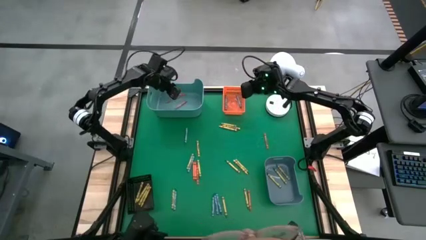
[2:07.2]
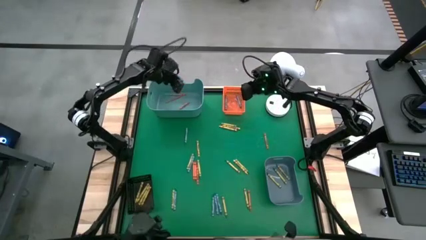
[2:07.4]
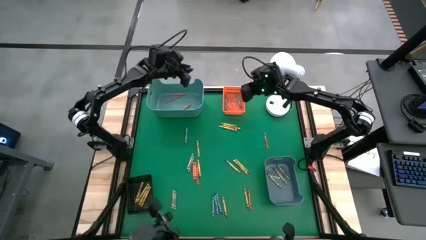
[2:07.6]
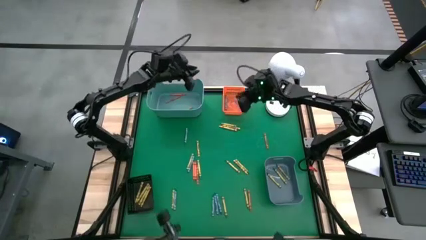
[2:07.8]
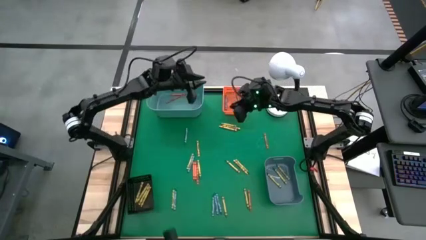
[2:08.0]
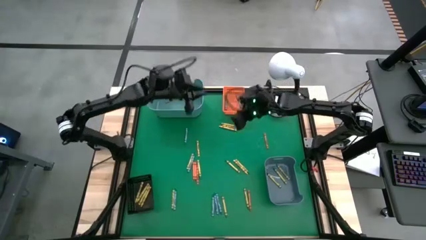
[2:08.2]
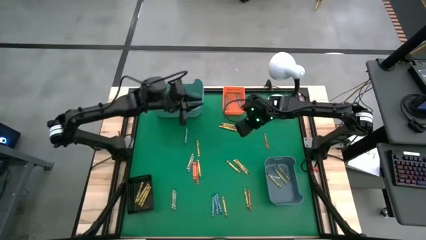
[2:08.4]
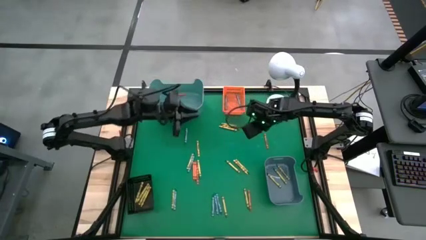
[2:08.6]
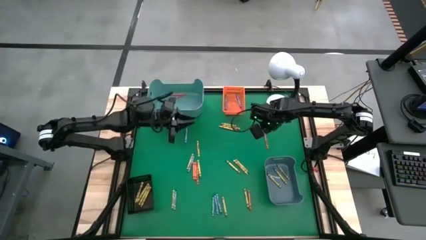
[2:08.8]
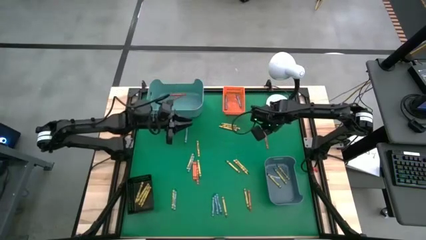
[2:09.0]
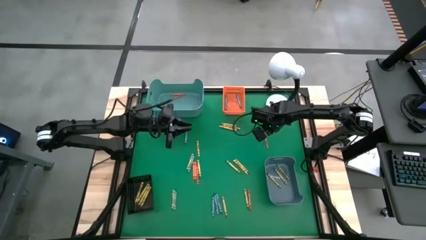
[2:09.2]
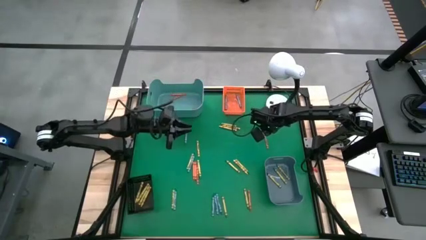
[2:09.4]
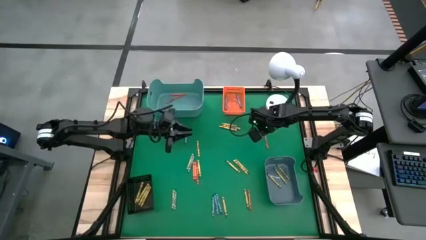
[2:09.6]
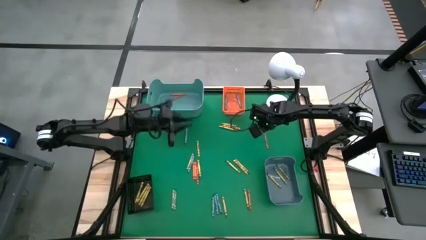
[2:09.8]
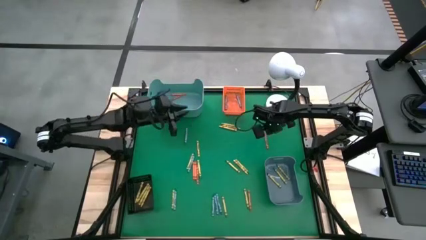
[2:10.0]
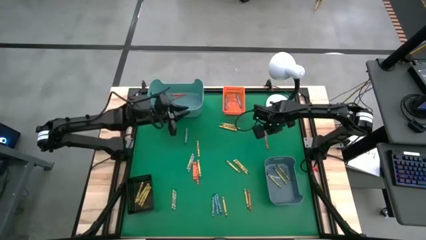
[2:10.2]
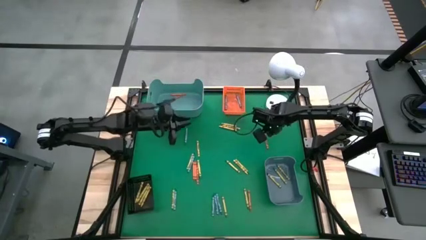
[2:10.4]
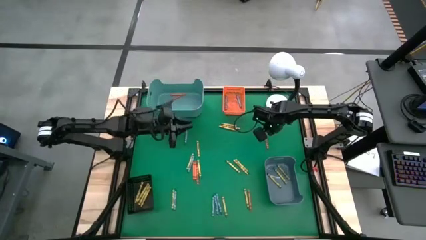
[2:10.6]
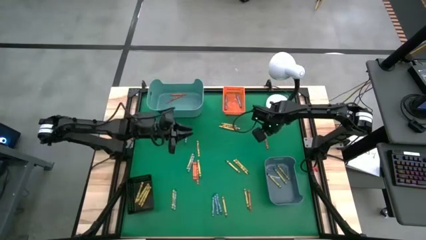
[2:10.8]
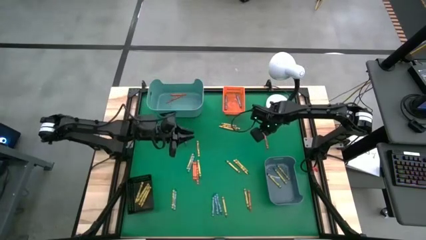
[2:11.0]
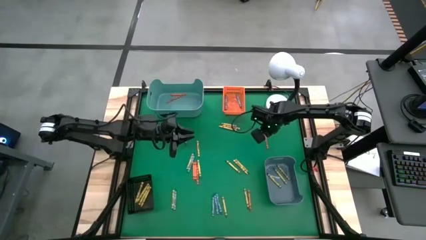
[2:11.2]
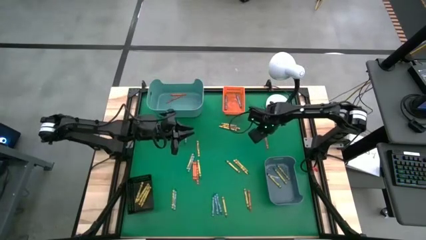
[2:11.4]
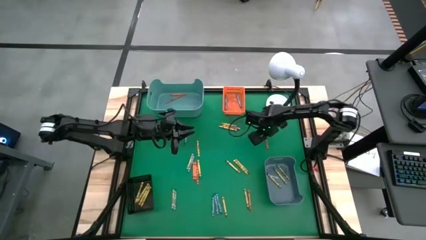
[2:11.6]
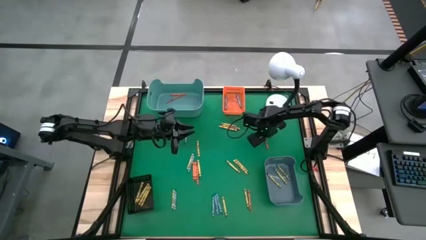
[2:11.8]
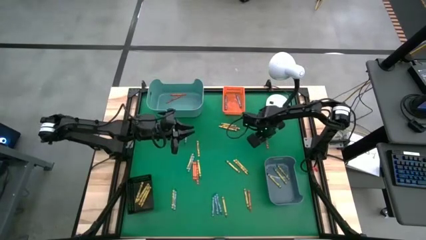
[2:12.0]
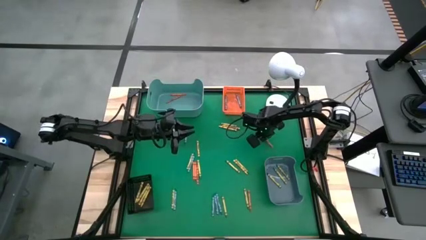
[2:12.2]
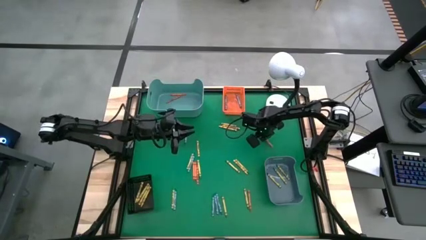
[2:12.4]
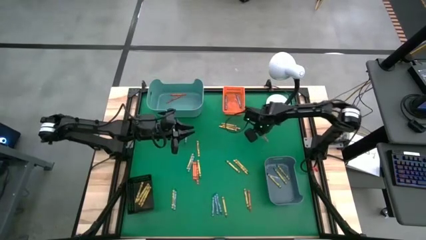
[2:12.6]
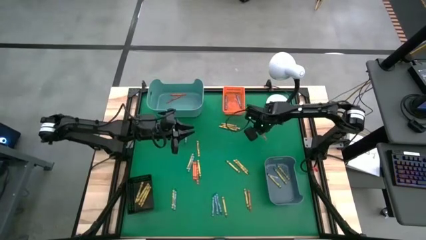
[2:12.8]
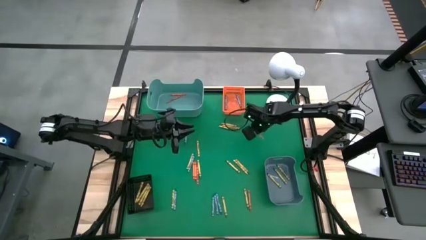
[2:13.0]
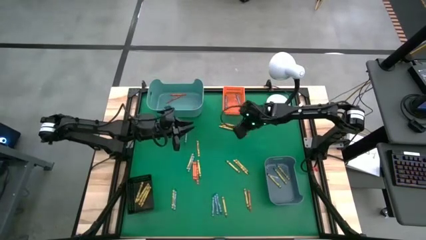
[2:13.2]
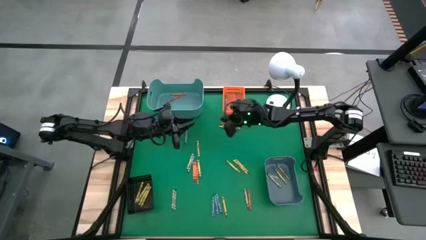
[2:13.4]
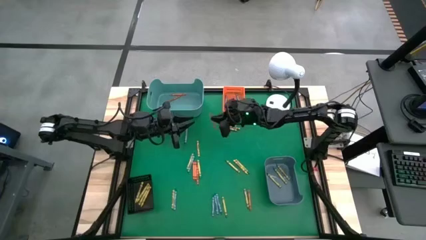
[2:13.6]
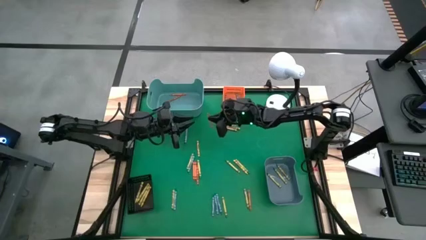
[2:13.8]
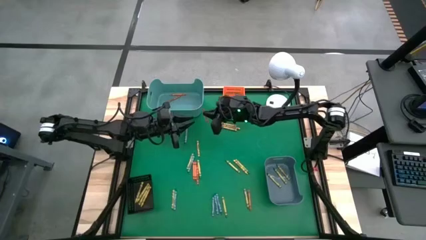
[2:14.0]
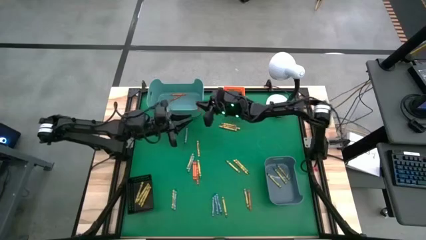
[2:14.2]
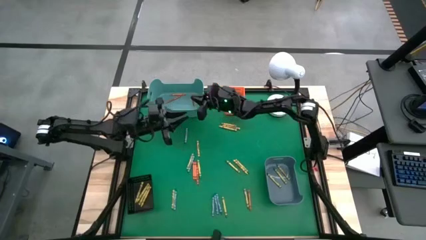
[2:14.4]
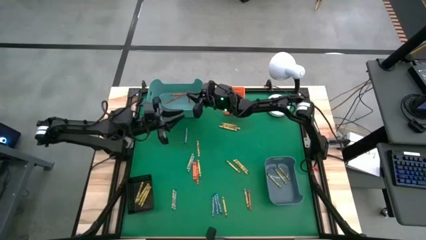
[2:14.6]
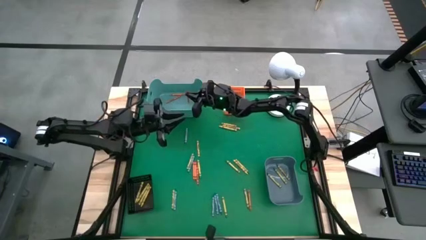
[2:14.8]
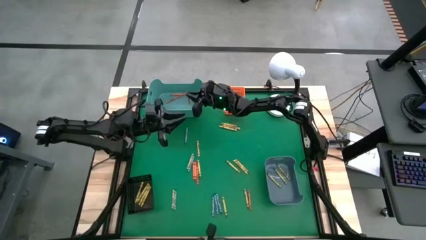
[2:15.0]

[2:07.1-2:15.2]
Task: Sort crayons
Put the orange crayon into the green bin

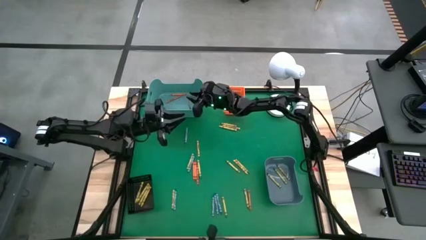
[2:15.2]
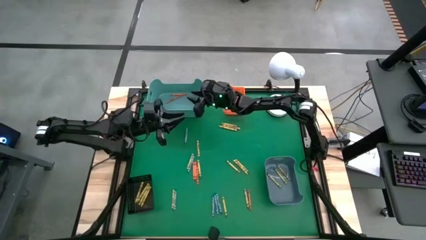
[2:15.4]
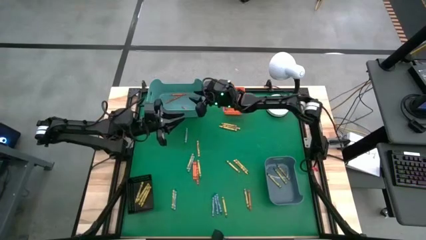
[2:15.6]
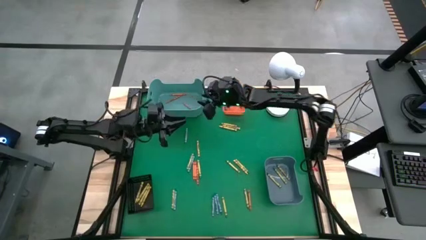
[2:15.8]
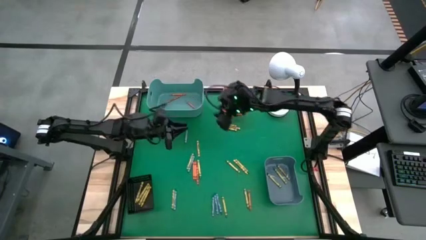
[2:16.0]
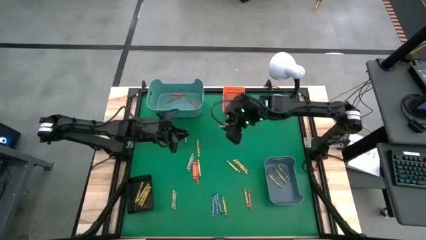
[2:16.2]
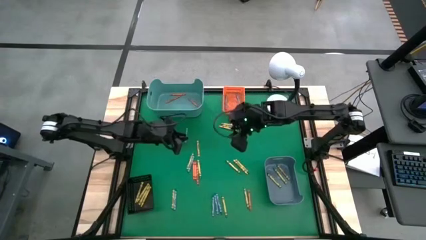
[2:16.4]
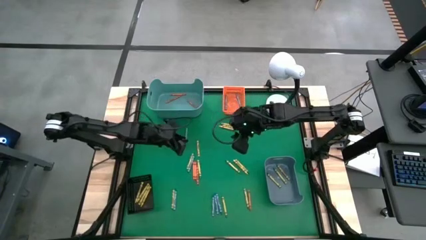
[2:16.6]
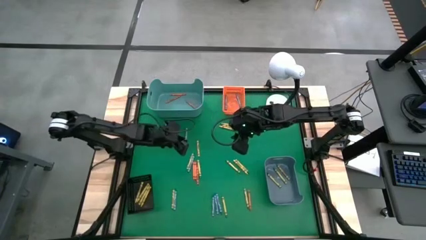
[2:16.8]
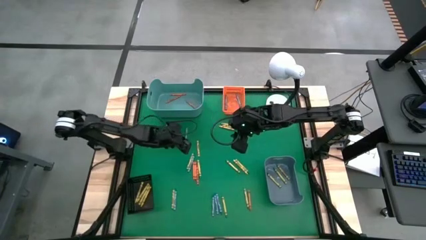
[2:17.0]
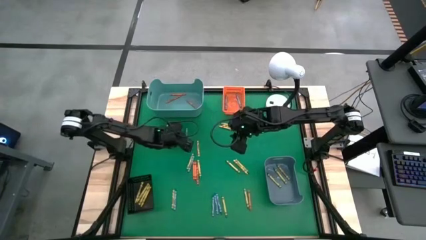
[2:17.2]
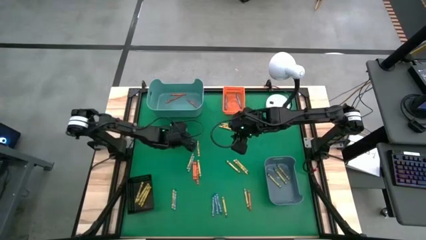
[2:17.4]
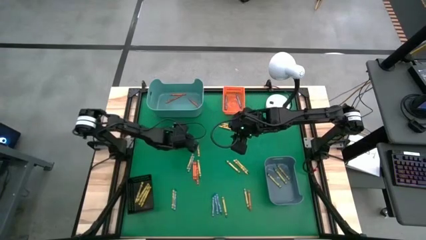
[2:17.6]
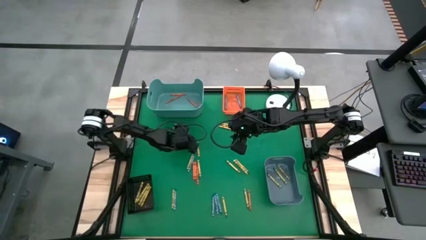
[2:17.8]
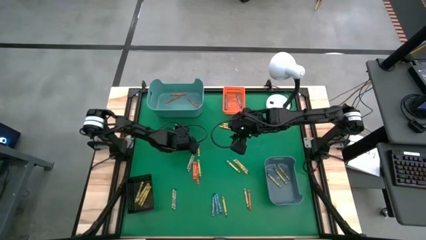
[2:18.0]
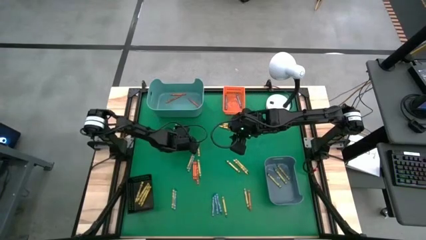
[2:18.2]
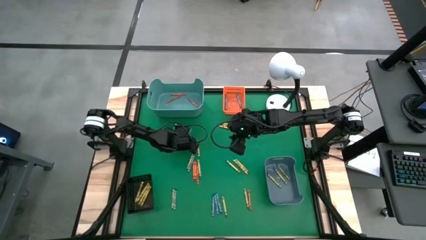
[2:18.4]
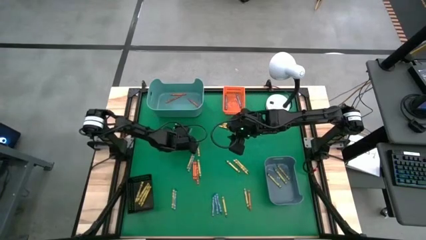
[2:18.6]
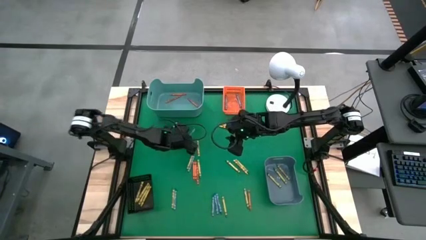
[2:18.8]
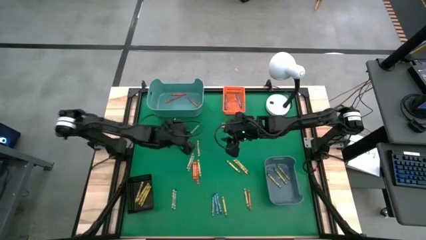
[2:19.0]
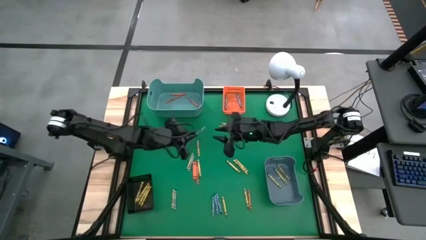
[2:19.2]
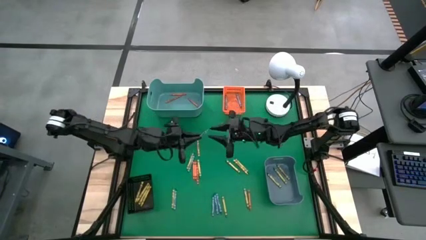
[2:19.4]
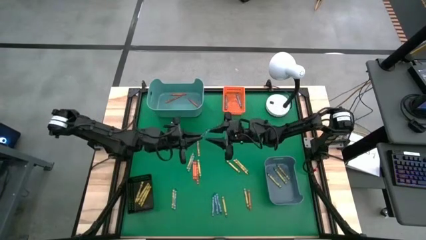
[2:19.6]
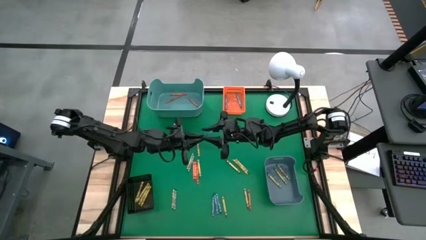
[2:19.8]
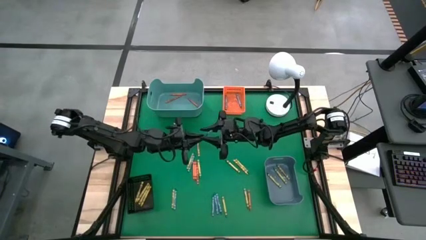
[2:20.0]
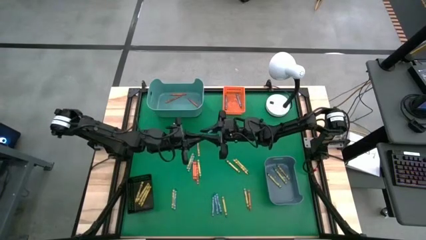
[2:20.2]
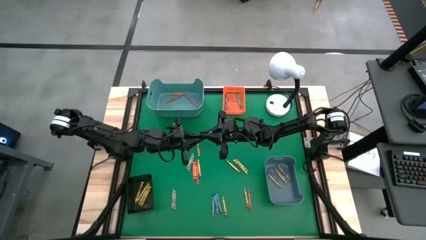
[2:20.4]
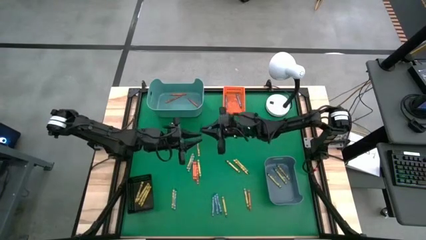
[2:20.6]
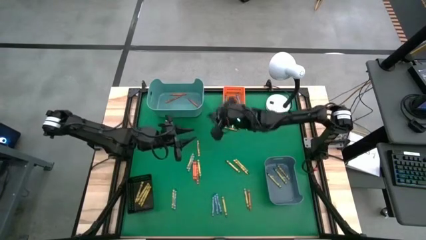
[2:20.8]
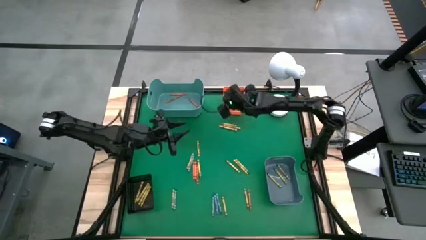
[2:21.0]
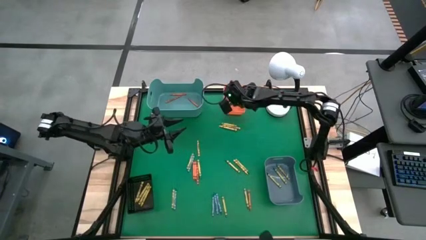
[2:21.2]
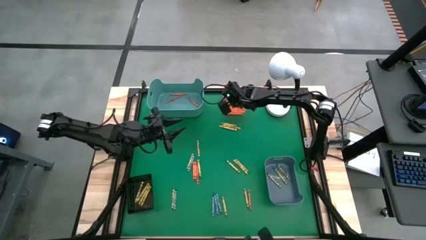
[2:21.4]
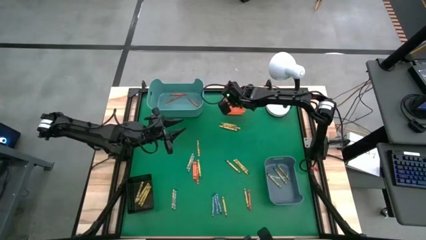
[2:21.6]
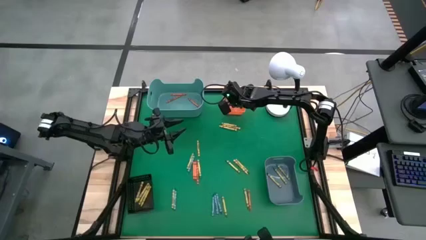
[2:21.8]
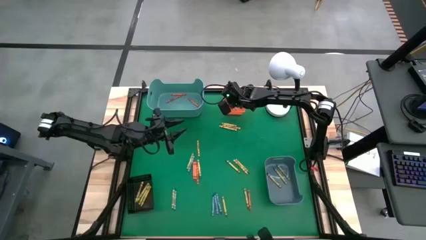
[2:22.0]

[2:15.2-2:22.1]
Put the blue crayon into the orange bin

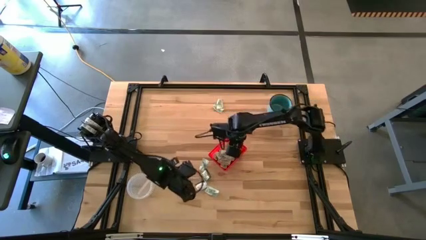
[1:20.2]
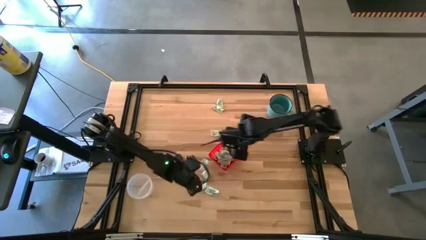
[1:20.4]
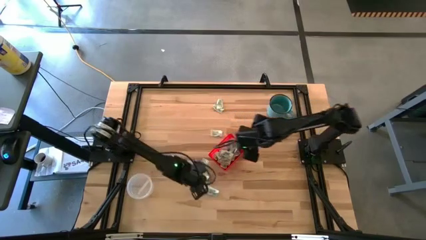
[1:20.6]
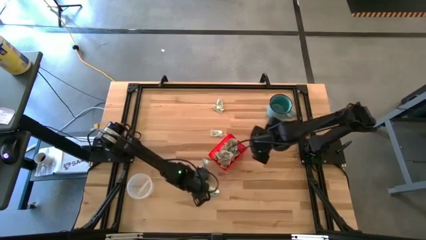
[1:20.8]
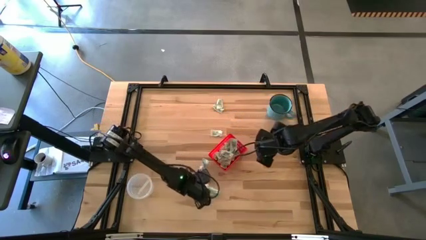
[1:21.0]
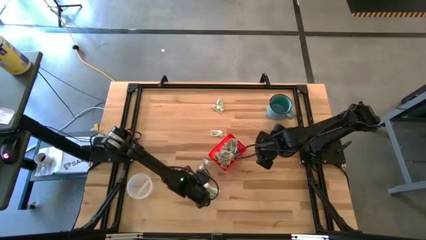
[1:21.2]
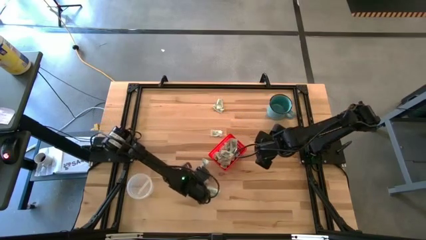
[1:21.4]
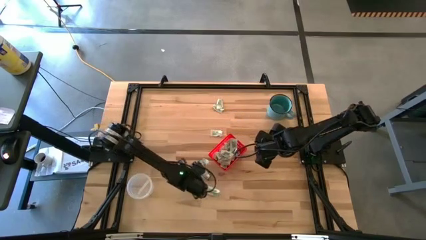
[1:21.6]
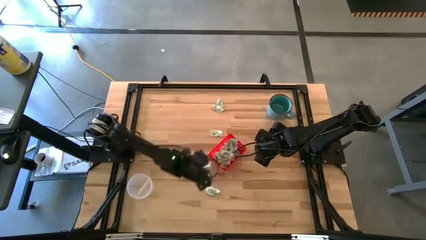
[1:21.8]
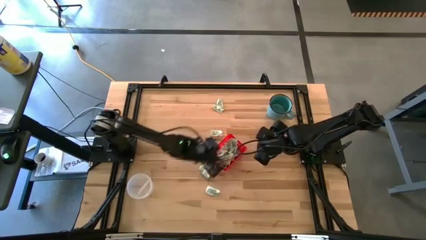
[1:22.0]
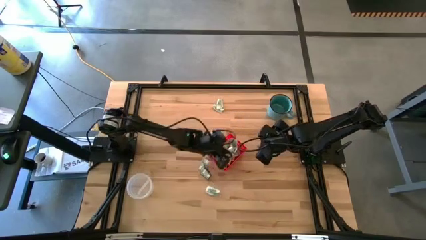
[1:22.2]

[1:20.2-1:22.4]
Task: Pick and place items into bin
Put the bottom green stevia pack into the red bin
